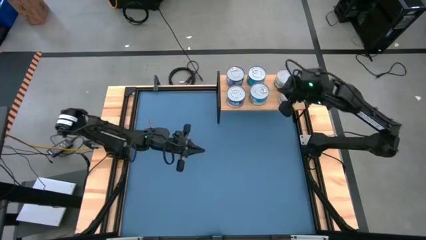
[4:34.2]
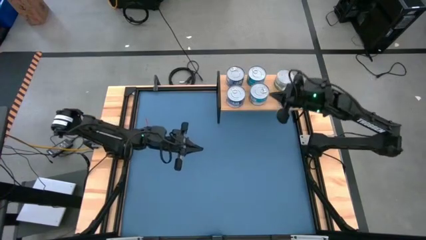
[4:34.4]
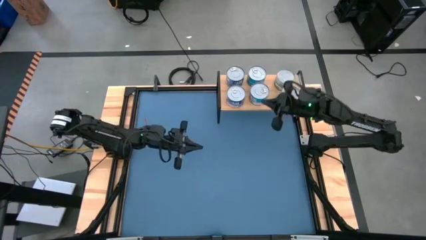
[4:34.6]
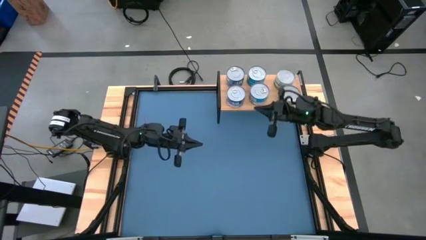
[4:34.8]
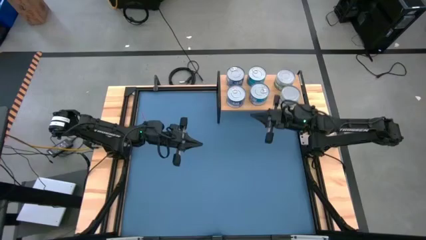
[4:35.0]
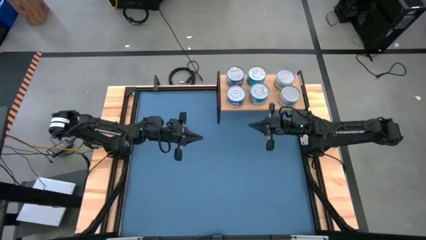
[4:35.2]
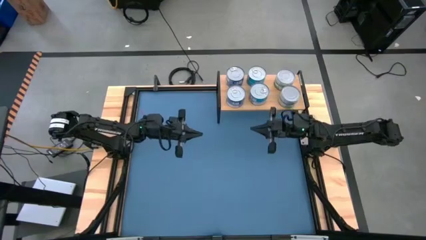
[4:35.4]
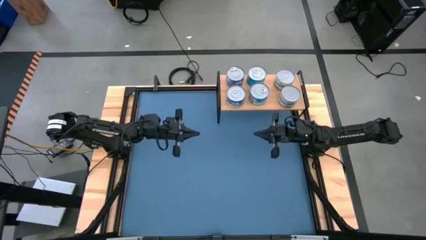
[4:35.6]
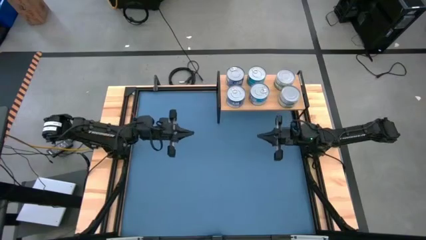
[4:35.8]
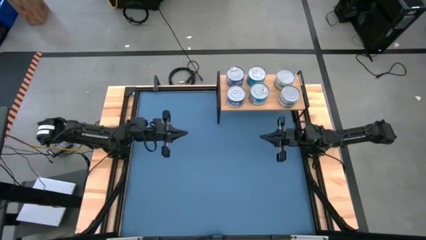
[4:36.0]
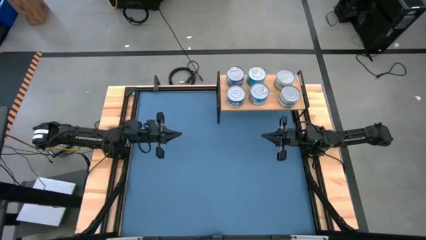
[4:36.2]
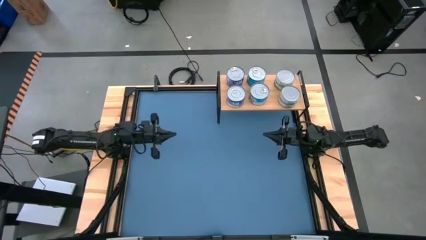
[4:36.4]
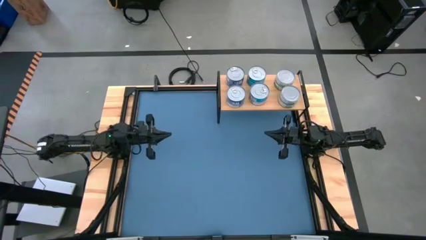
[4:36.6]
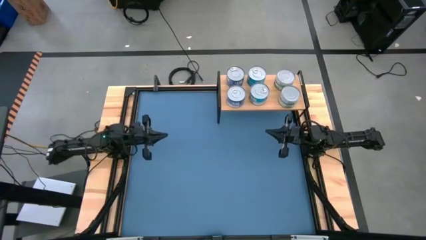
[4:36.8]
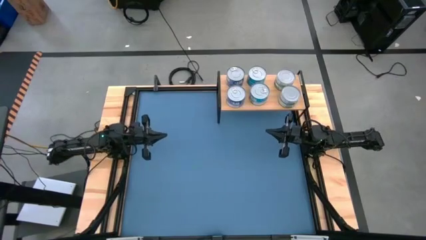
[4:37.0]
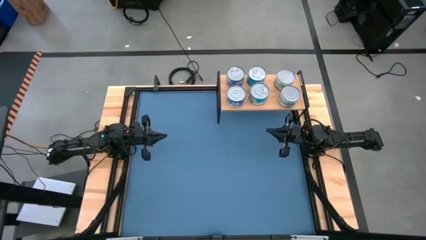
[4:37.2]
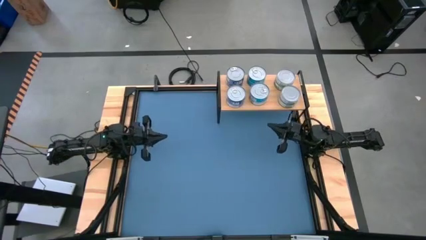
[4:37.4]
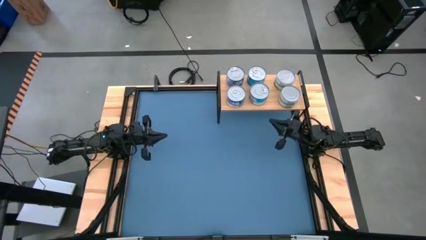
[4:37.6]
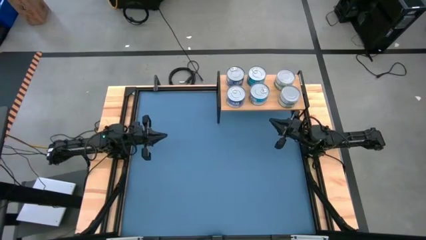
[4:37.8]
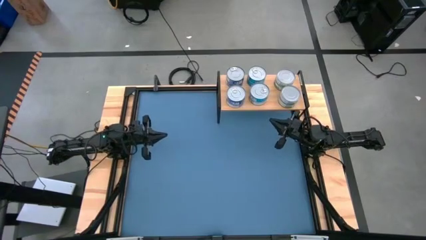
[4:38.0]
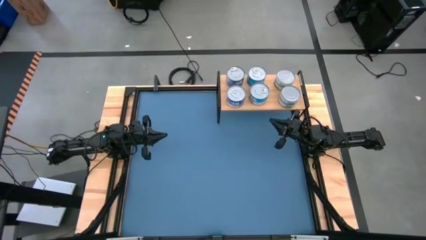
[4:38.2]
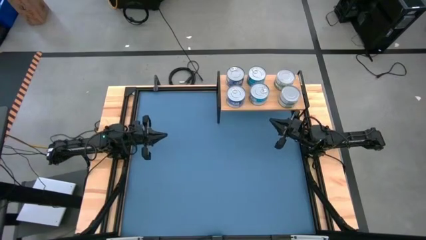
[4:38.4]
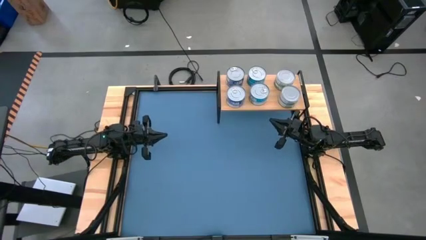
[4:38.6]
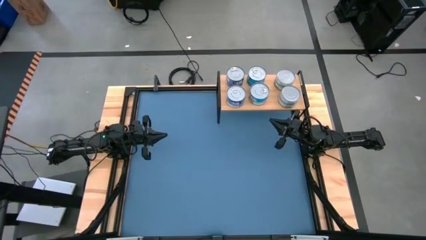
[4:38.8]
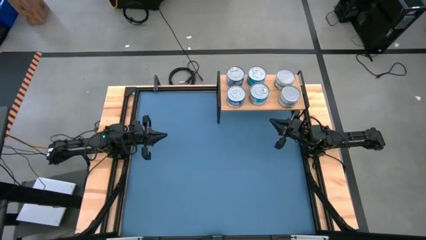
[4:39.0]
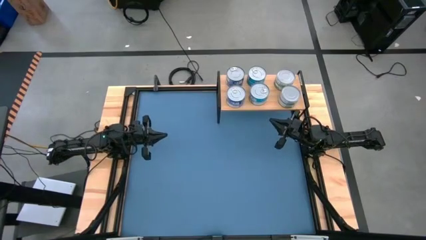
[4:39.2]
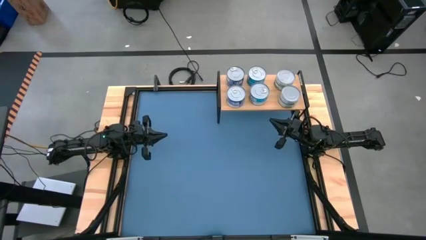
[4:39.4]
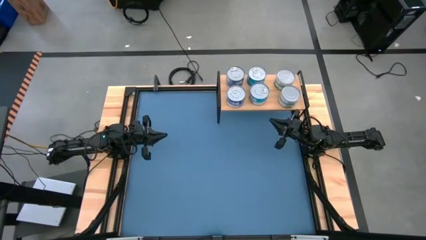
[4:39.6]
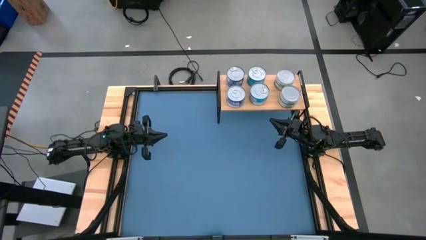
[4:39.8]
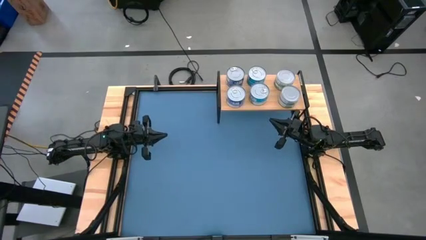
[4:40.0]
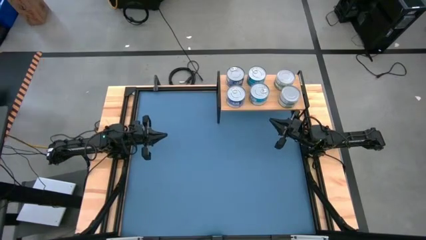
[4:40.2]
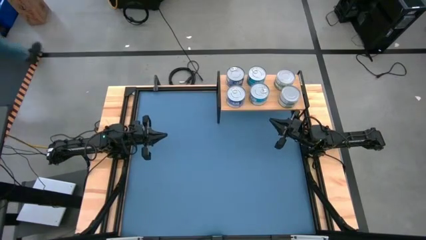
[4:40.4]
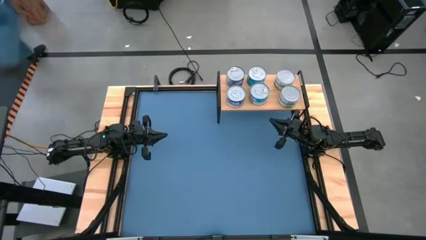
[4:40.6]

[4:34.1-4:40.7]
Task: Stack canned seafood by type on shelf
Return to Home Position

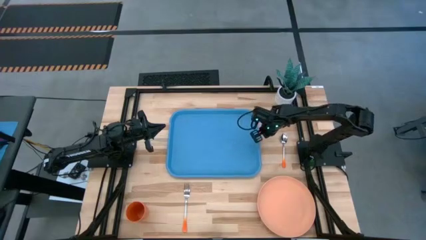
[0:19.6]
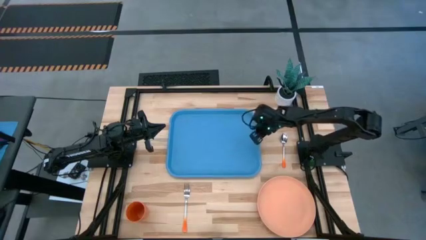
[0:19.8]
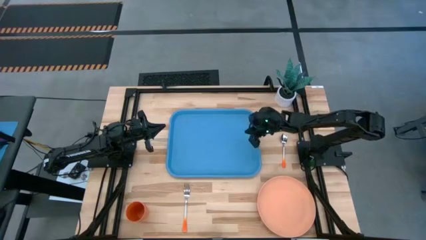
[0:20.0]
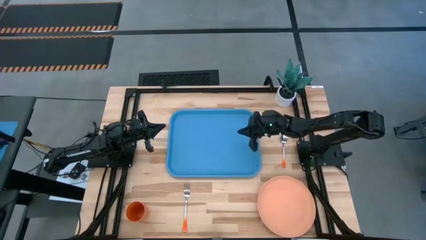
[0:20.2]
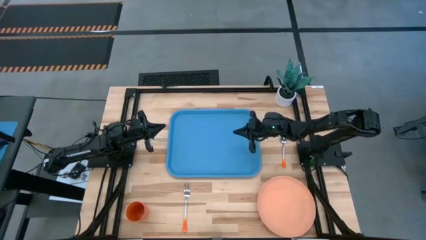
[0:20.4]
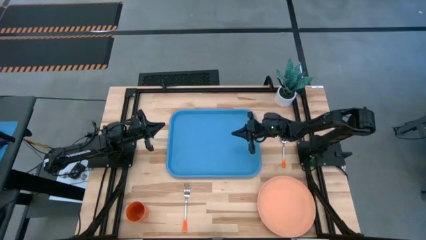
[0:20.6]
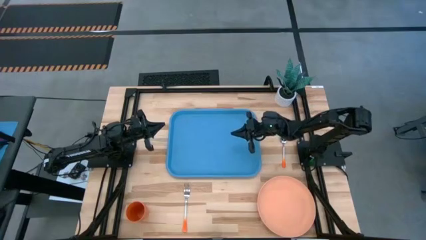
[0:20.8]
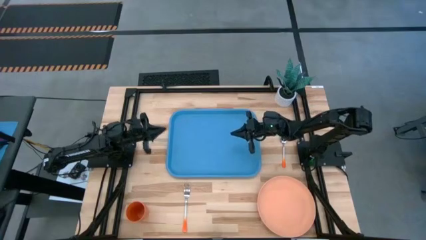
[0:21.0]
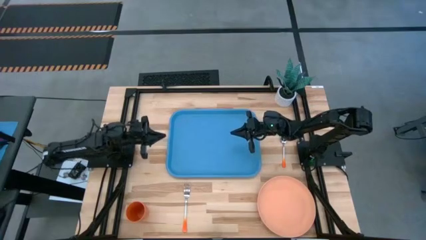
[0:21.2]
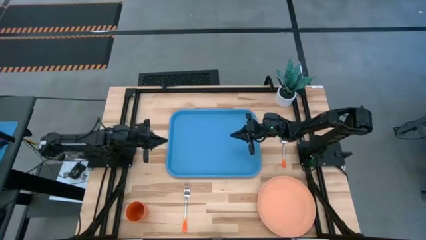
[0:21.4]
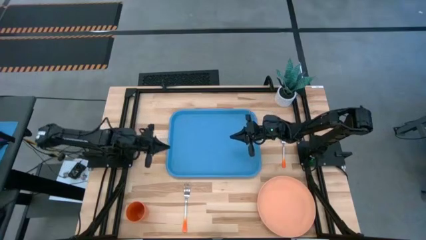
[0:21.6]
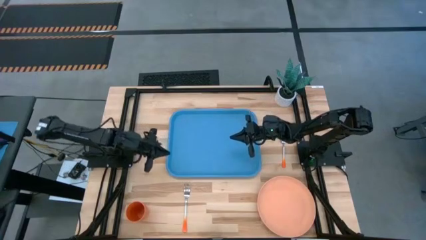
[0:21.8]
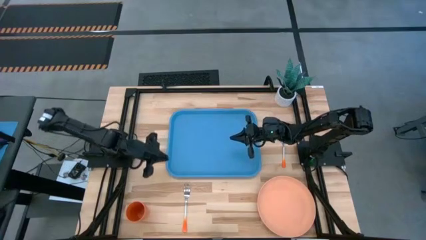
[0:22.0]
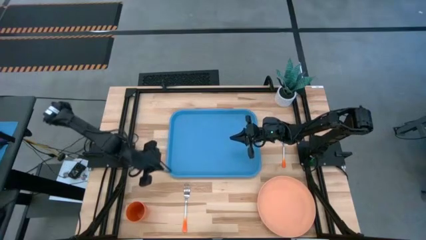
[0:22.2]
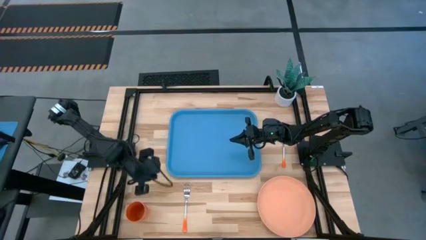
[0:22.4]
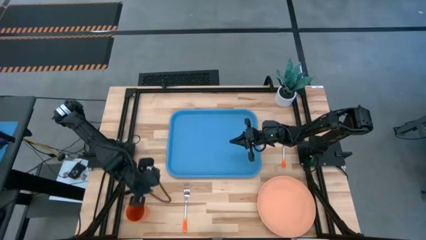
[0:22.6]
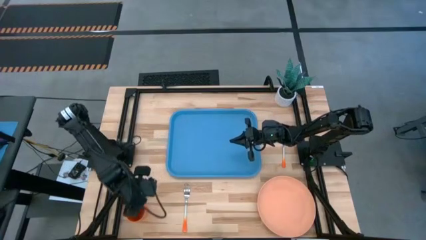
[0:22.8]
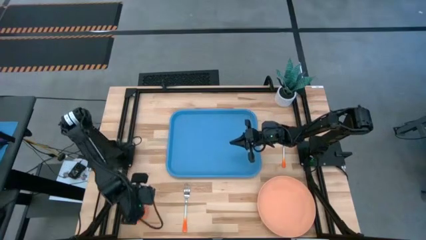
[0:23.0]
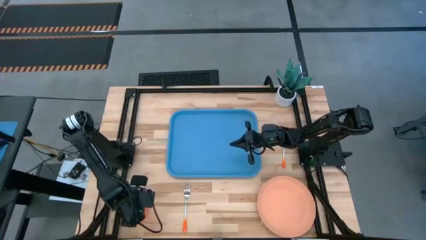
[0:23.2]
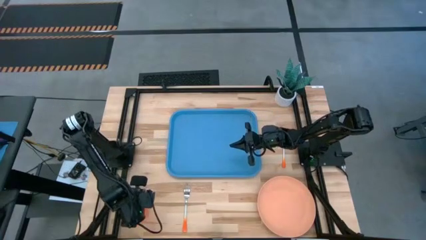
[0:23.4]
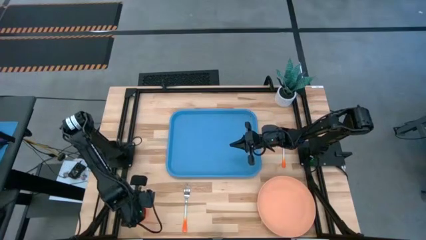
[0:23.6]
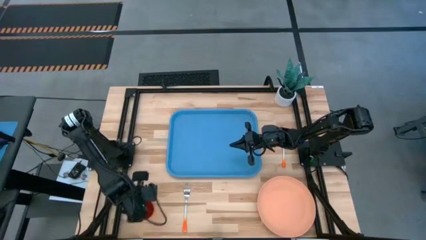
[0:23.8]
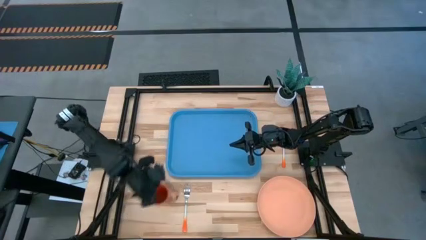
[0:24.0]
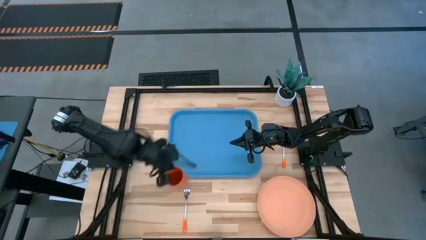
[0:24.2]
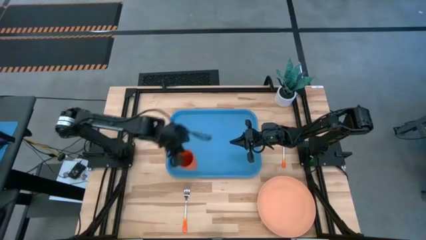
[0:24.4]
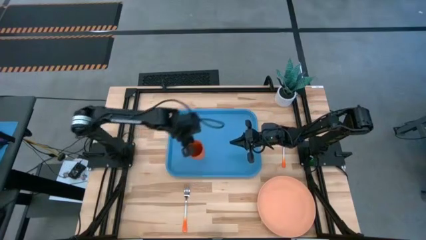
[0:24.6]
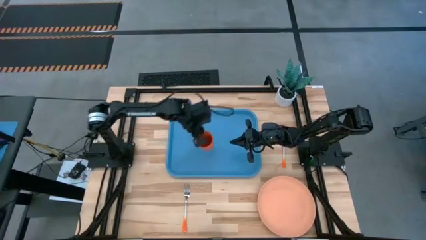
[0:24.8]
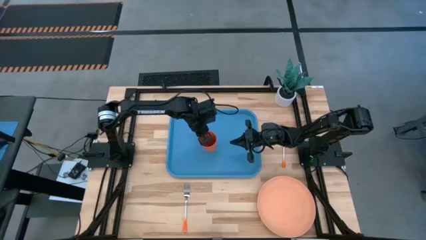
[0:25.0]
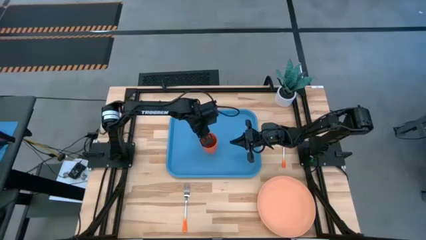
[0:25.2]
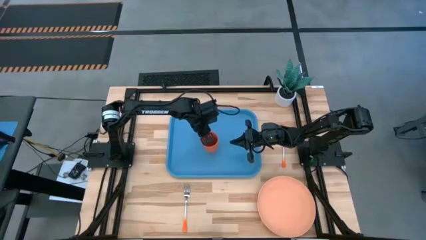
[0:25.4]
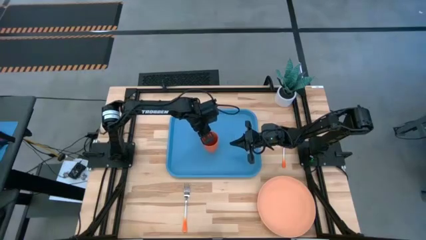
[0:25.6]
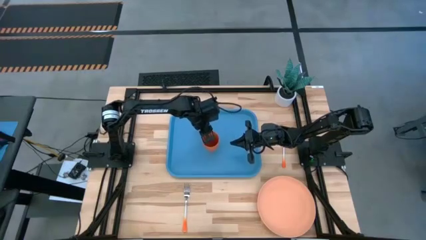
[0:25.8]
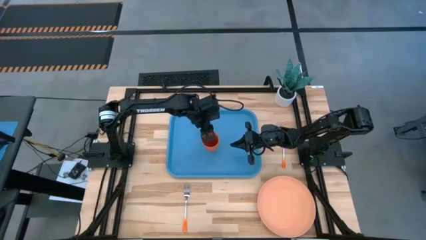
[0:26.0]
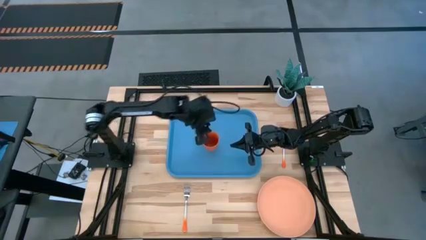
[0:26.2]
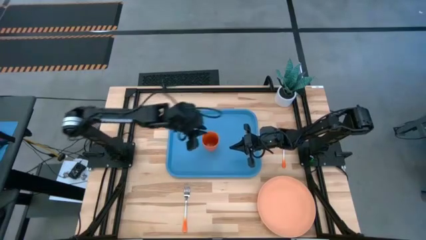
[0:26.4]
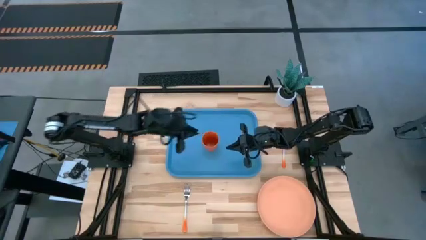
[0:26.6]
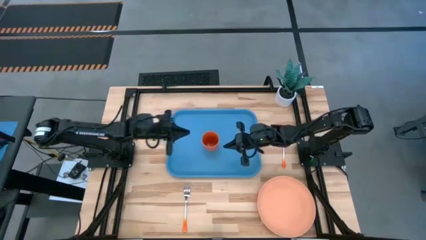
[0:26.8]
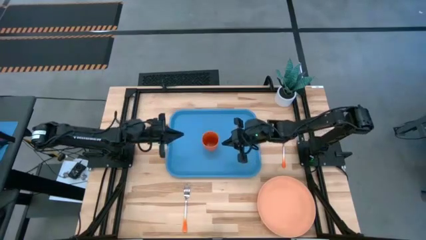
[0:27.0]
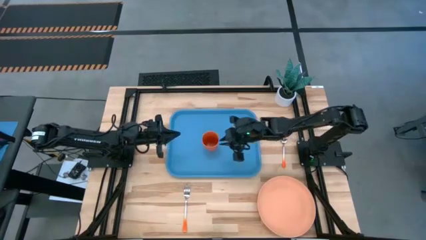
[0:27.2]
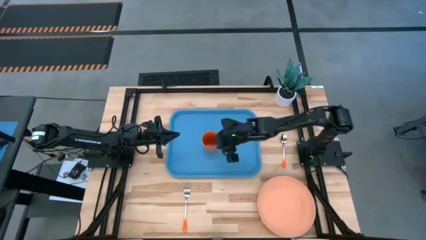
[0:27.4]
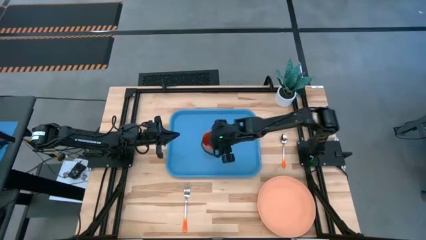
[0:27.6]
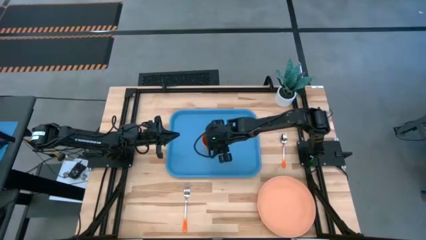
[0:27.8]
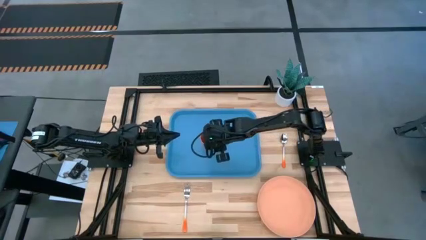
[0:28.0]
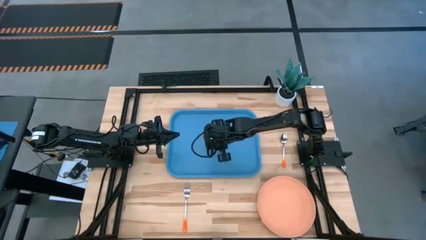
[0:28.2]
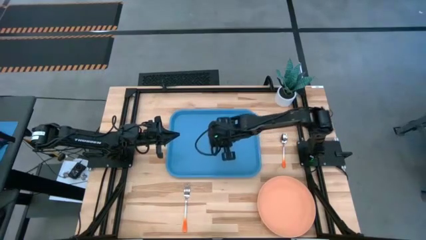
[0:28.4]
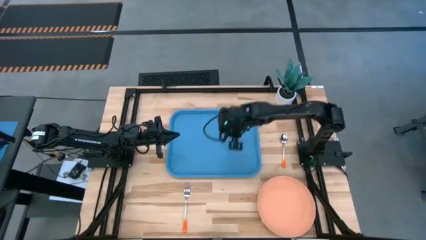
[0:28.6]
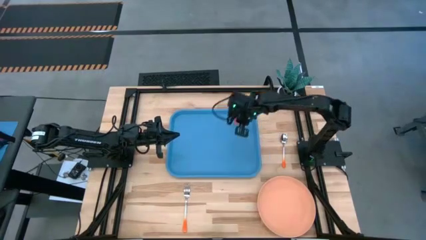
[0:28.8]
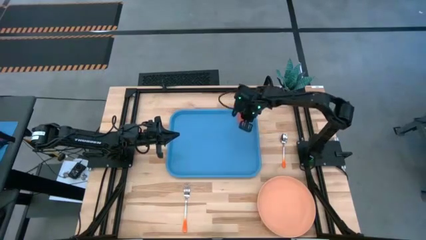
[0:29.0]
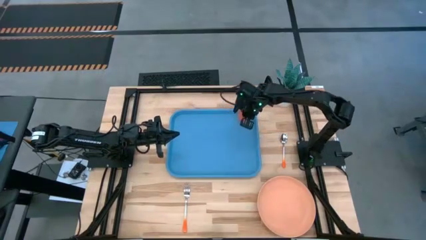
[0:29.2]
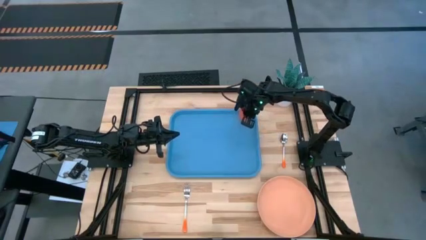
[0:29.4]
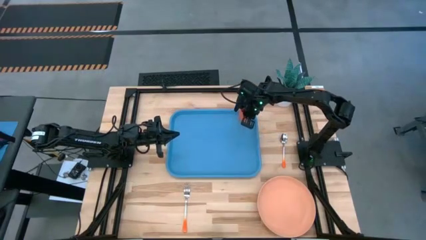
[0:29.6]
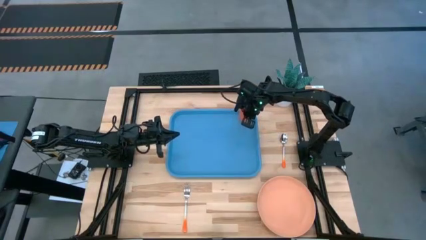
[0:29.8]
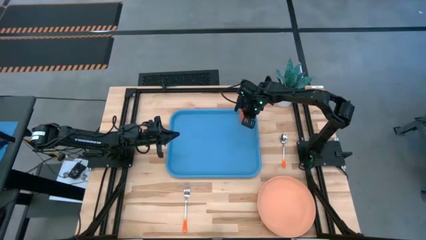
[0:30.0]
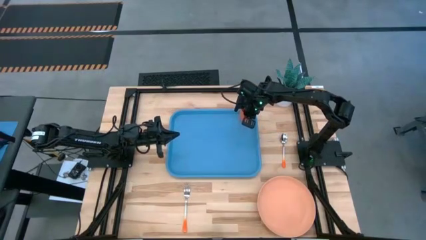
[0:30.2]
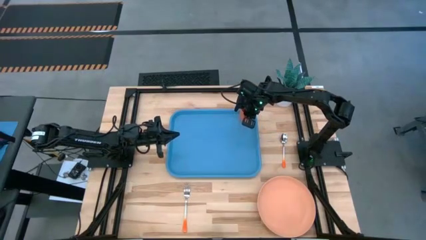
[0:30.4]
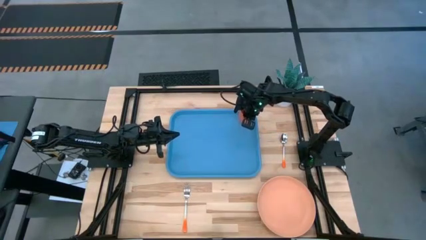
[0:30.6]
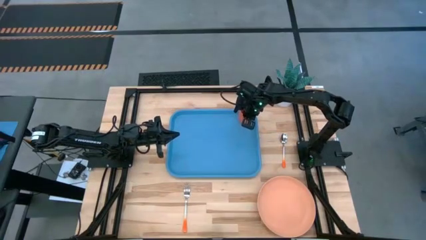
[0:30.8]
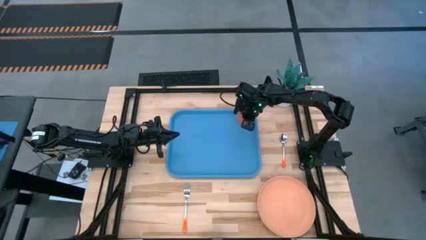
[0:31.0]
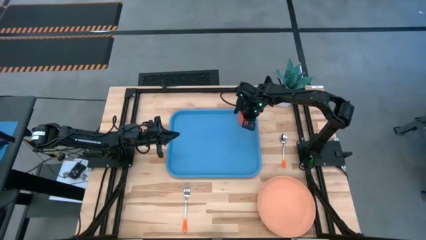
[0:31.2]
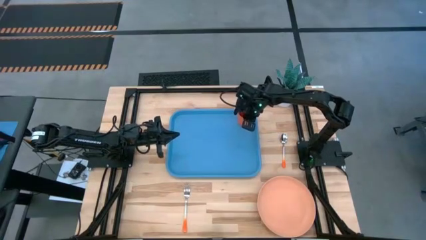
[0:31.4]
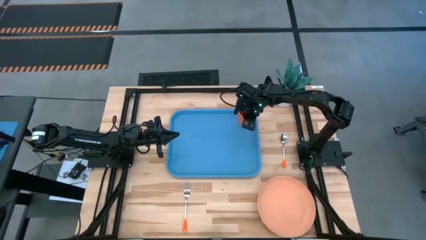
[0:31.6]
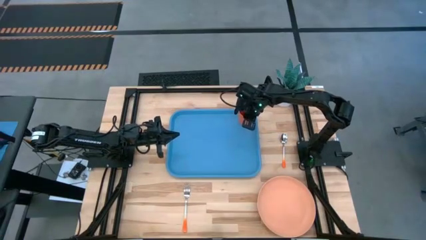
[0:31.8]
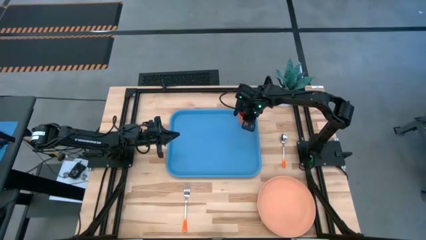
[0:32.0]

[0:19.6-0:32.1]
Task: Pick and place plate/cup/fork/spoon on tray
Put the orange cup on the blue tray
